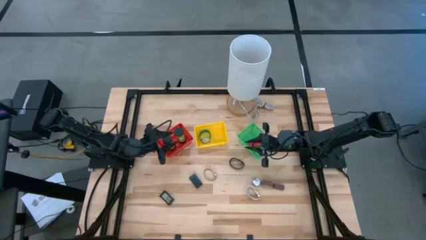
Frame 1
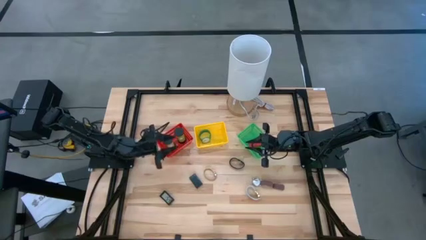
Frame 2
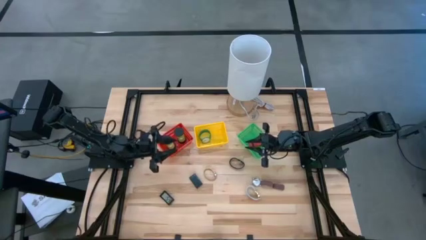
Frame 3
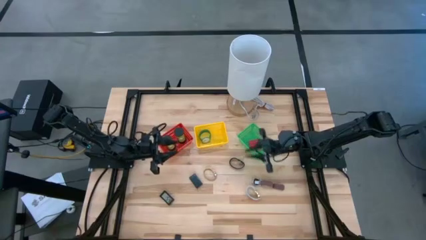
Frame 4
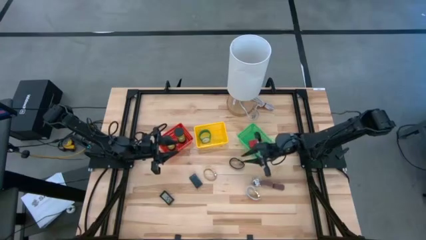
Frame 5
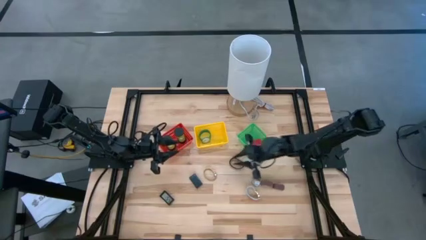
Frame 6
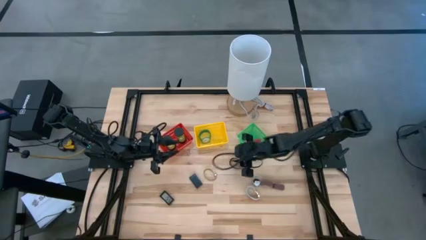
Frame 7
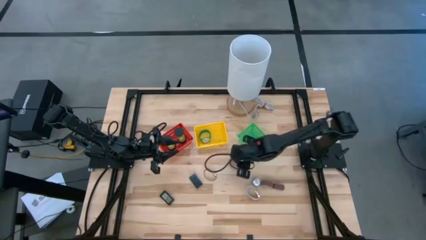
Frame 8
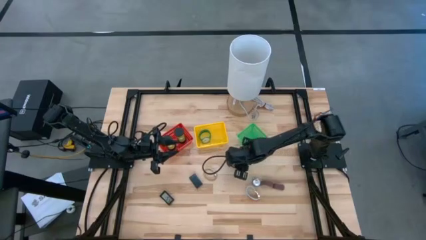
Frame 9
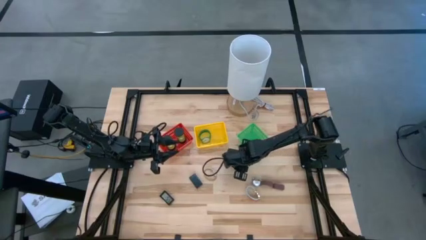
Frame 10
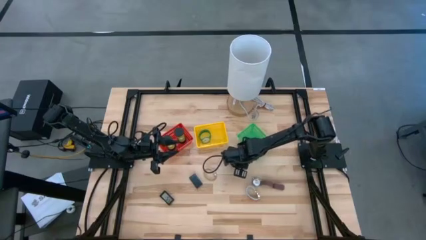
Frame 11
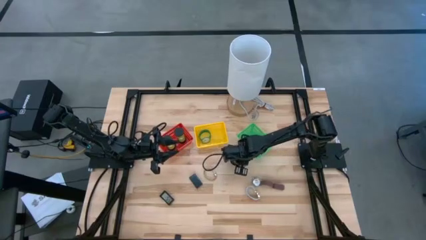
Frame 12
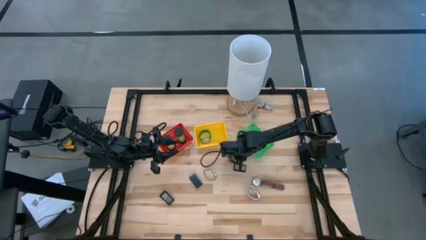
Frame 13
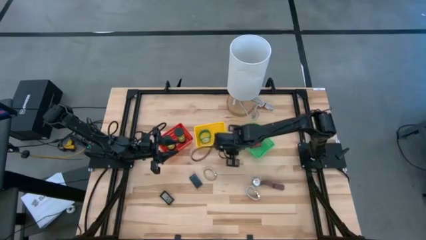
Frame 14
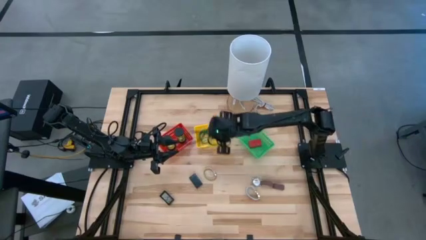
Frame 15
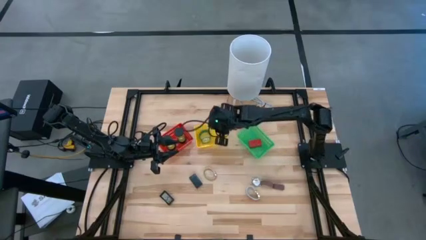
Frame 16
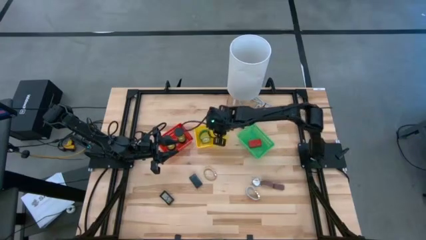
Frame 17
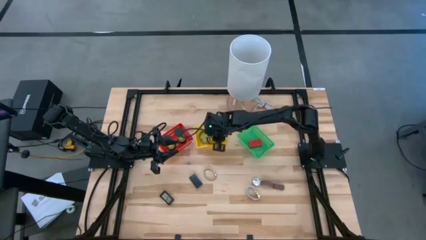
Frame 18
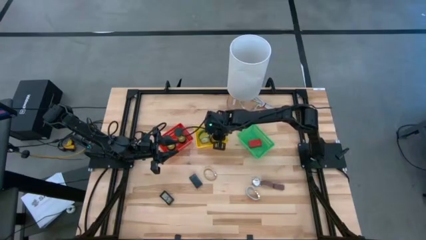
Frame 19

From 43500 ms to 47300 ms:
Task: Pick & Place Office items
Put the black watch into the yellow basket

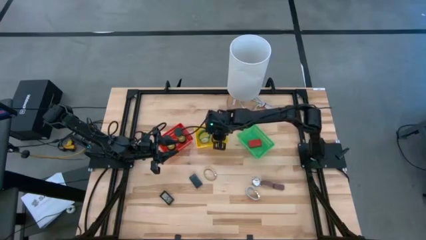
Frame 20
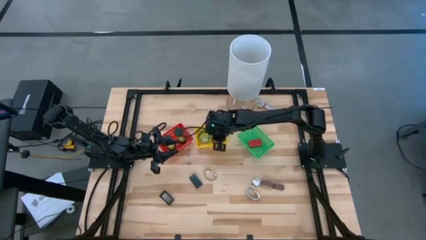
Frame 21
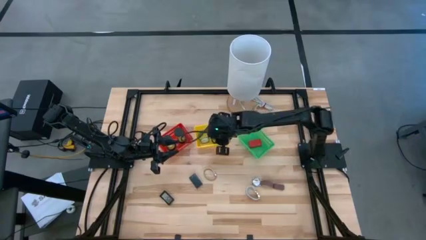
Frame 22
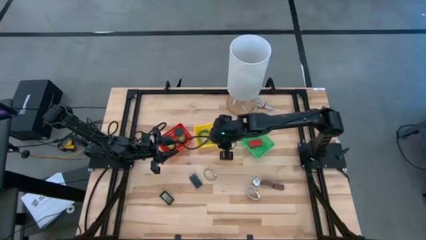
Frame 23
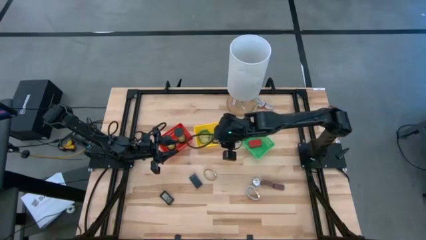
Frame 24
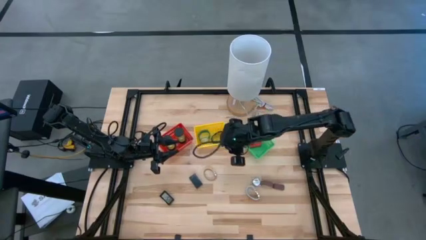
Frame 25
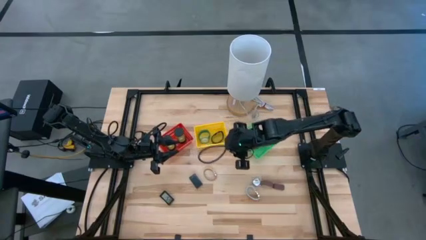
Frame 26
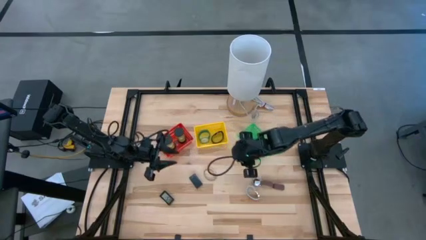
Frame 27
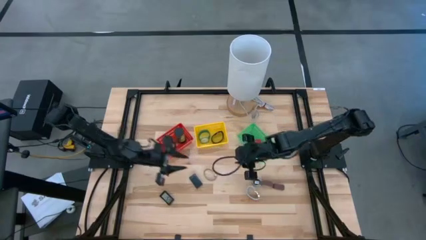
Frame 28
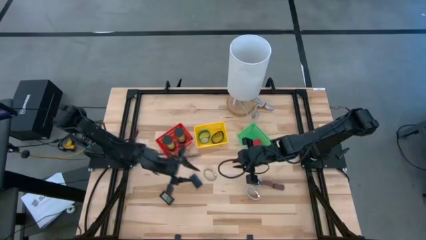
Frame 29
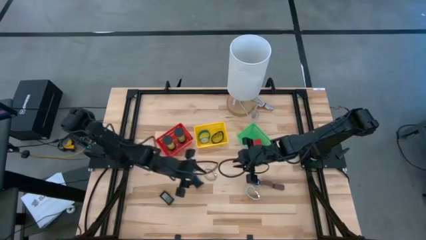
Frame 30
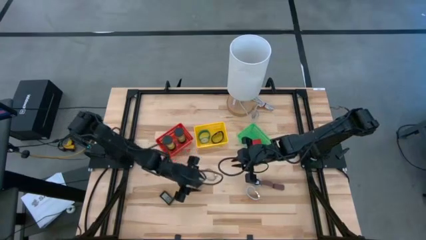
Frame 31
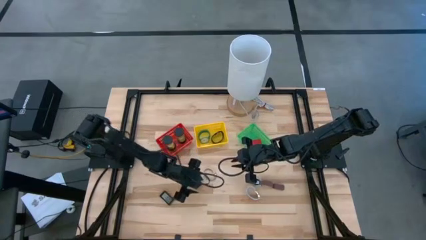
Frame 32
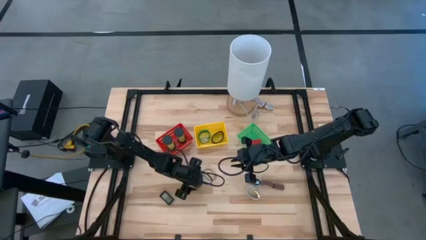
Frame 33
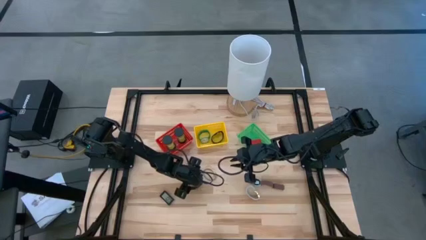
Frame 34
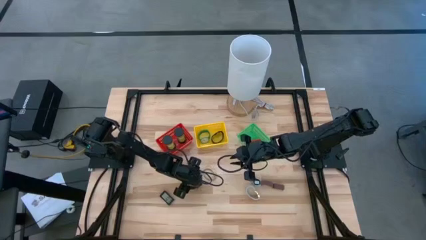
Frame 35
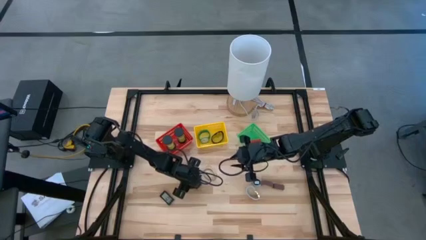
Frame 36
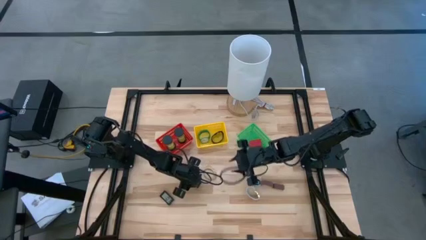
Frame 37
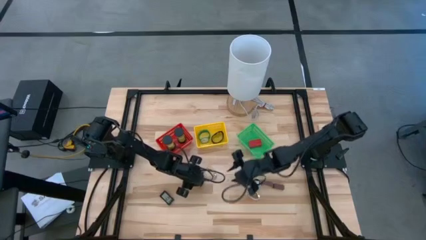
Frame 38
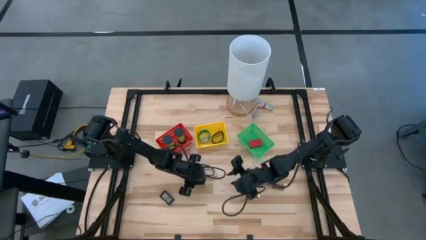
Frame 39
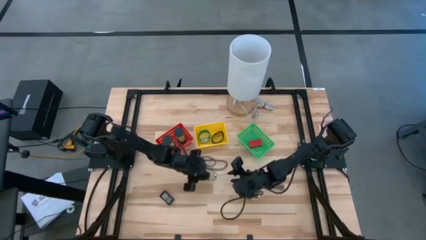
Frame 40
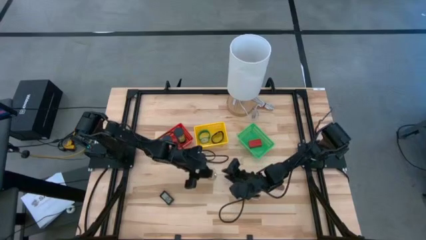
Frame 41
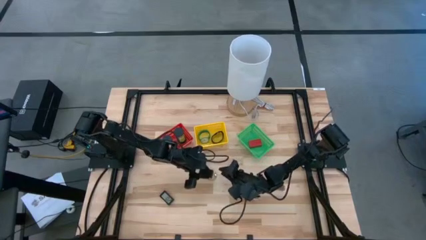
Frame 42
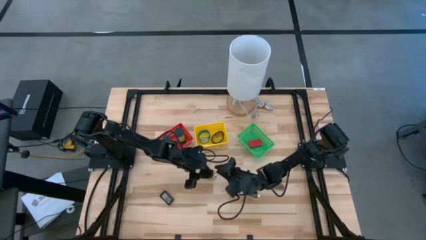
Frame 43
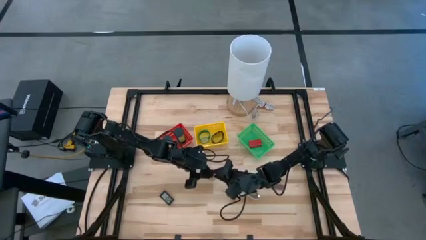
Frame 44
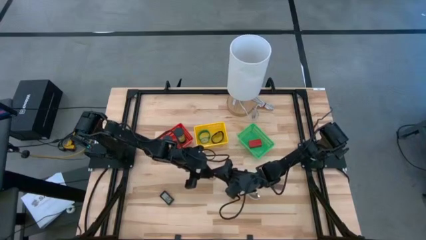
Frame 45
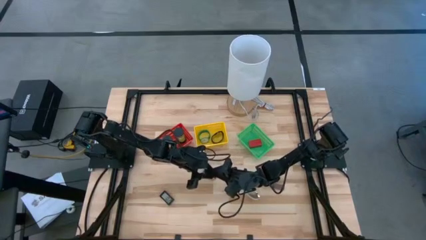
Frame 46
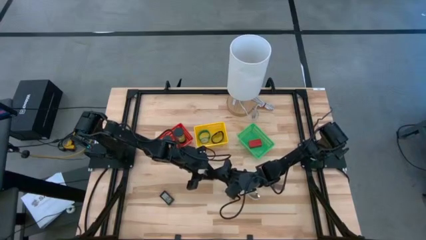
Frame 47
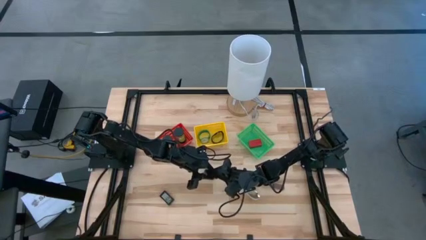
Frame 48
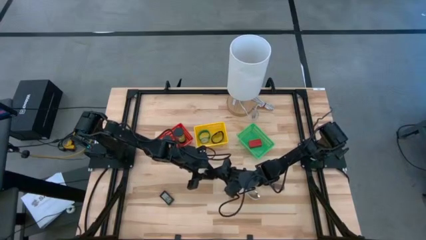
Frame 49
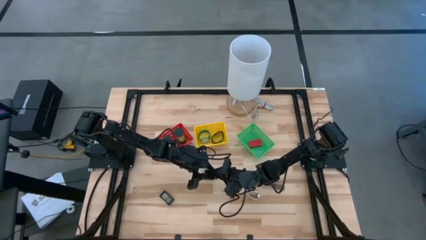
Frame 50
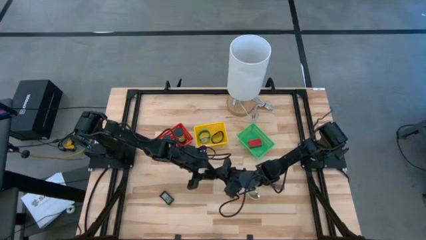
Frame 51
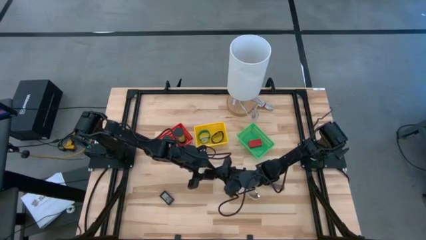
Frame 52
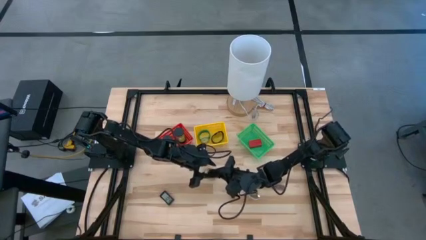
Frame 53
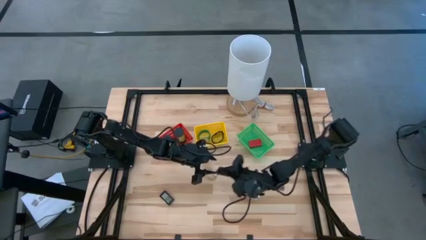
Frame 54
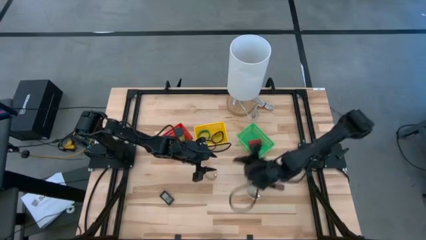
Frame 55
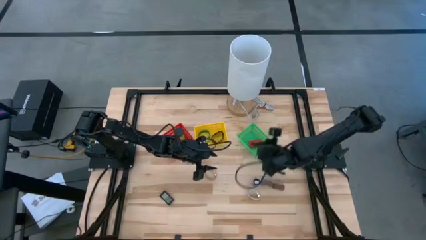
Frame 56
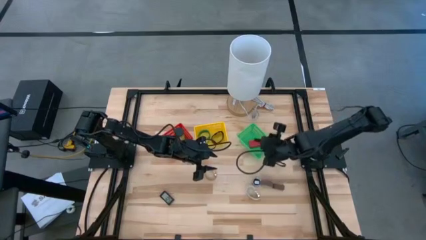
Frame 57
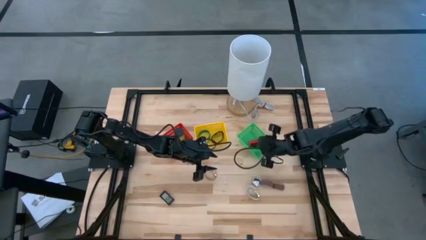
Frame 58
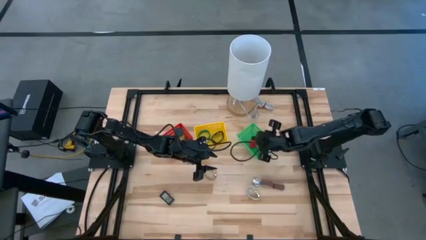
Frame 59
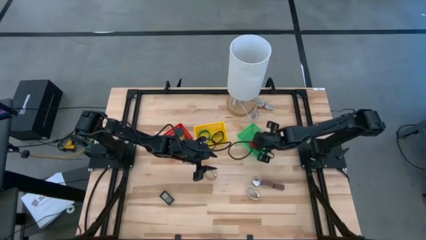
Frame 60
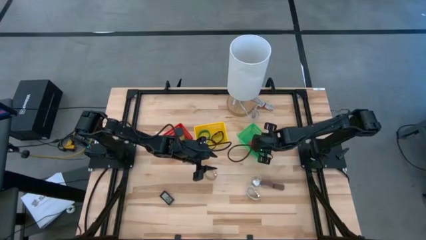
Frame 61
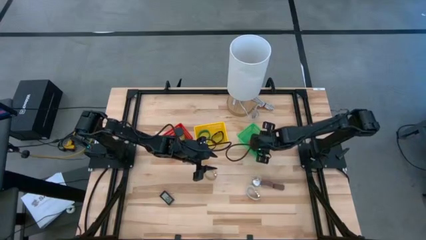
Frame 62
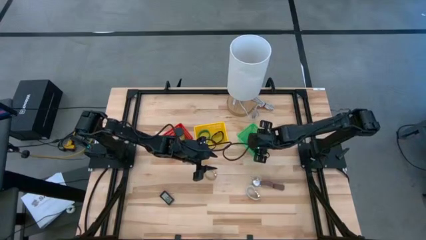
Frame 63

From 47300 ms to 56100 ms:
Put the top black digital timer into the green basket

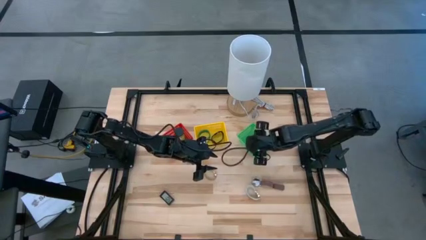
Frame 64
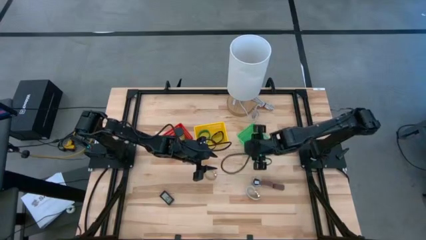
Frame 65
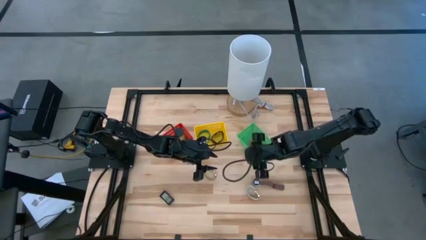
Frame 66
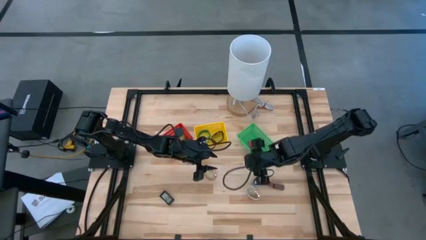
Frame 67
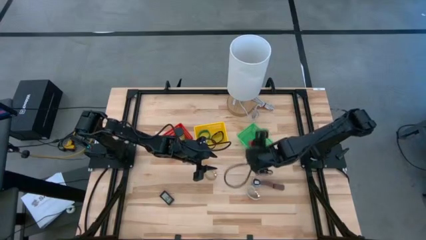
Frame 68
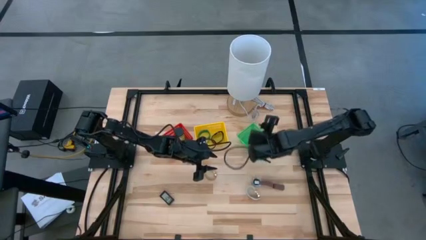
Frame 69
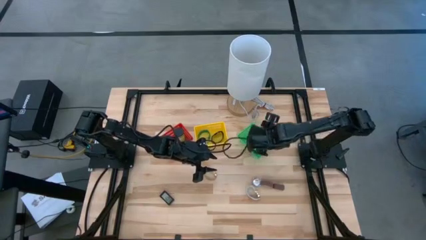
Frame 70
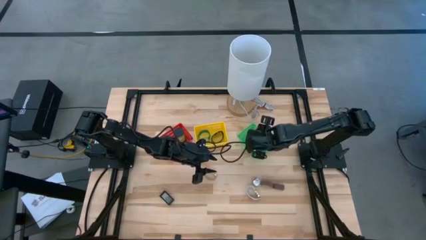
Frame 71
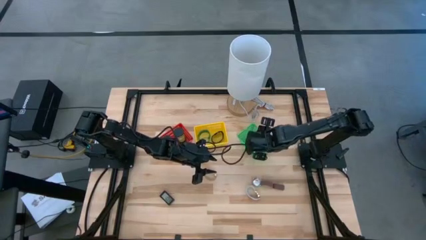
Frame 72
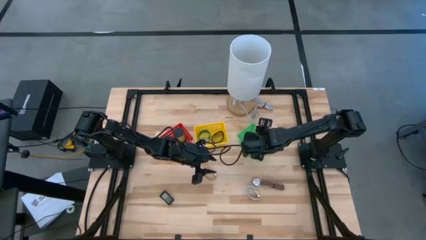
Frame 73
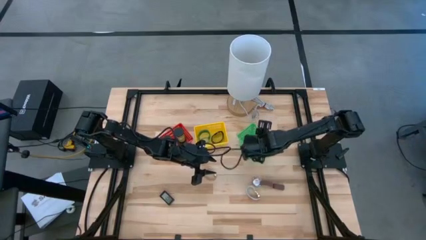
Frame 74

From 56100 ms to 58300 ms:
Put the black digital timer in the green basket

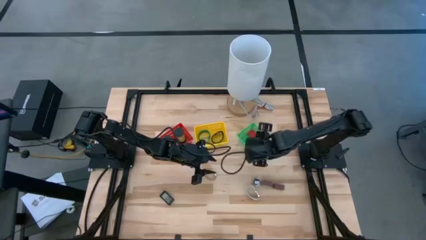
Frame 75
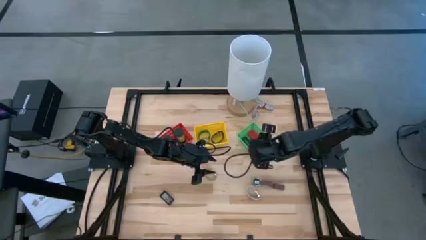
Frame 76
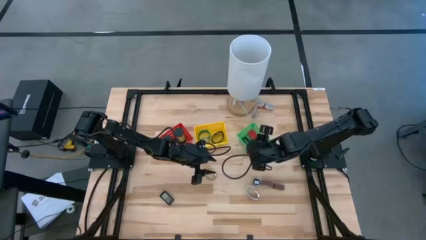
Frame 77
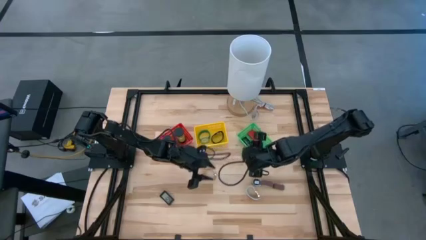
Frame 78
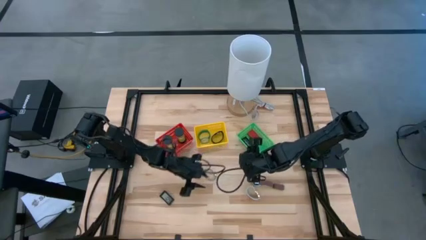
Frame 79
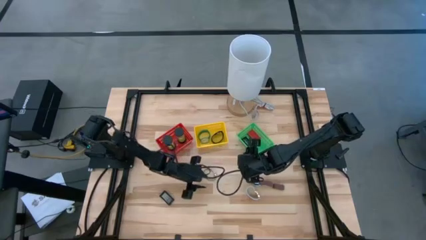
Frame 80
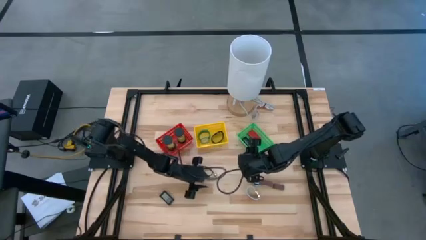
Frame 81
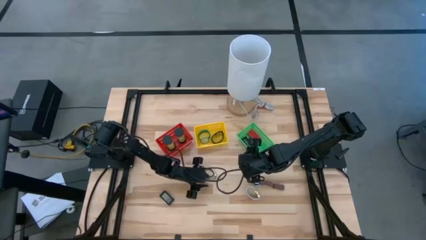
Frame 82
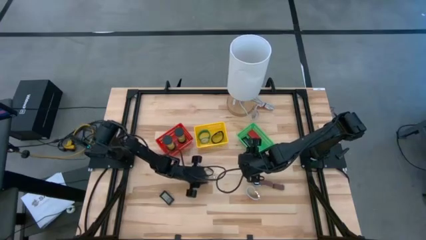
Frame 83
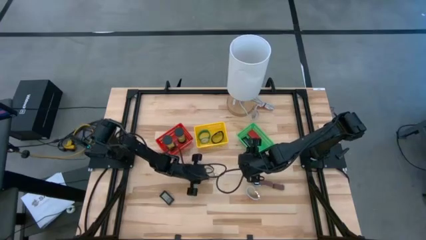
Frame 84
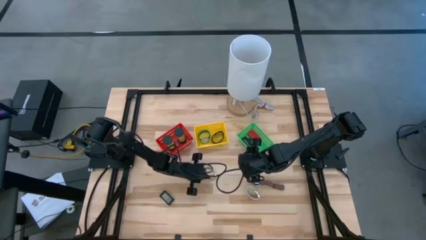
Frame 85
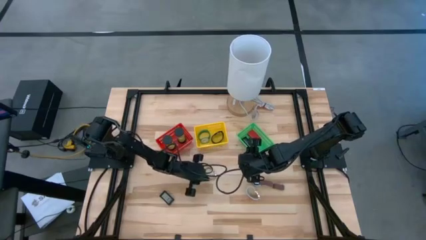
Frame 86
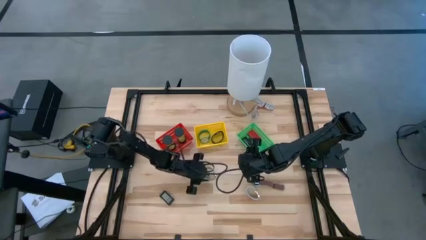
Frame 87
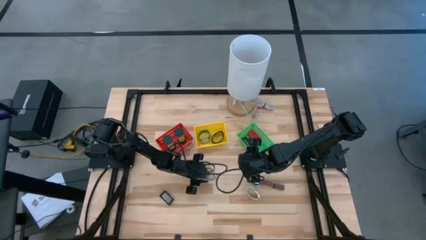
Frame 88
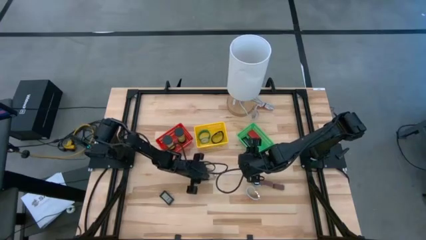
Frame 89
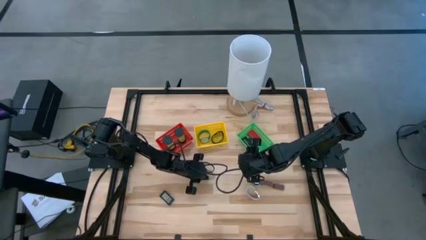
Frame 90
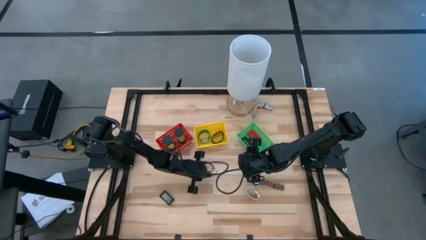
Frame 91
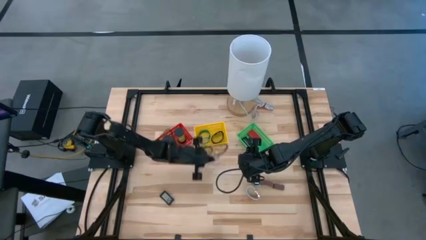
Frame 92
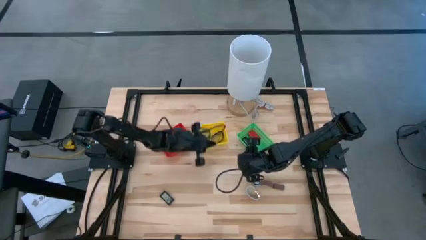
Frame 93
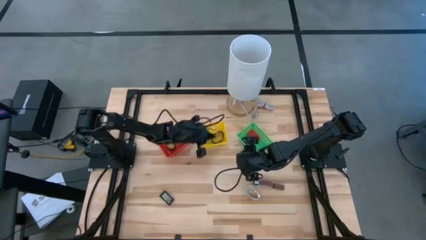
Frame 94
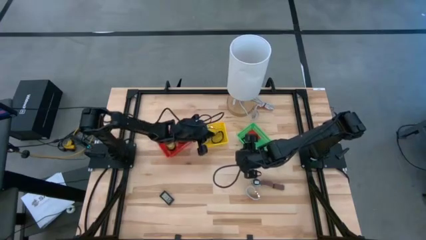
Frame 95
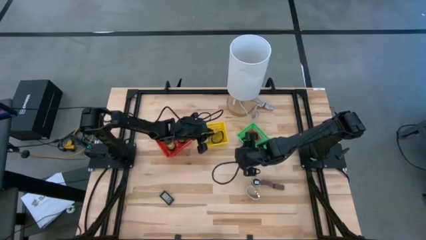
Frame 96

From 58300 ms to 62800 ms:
Put the gold watch into the yellow basket
